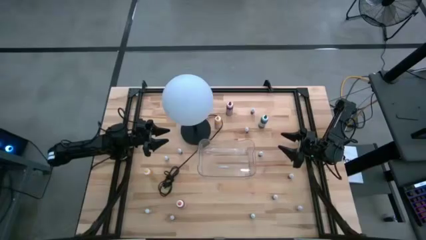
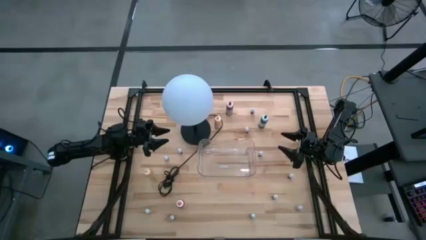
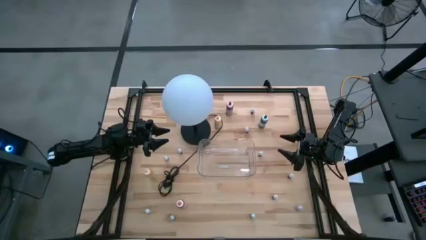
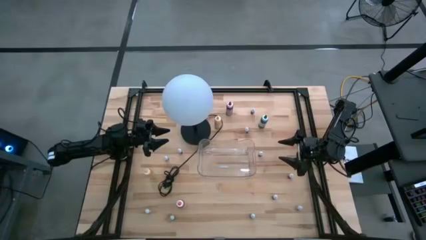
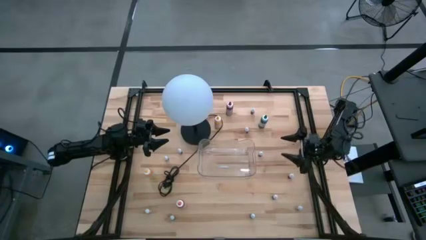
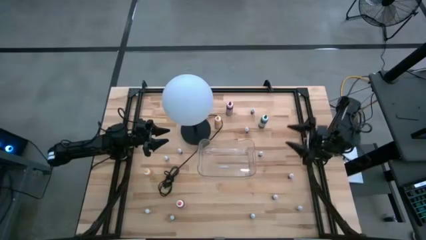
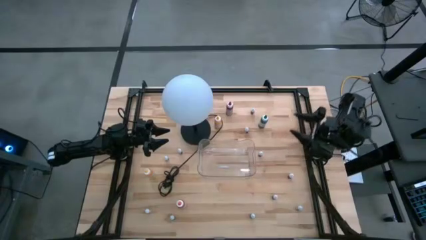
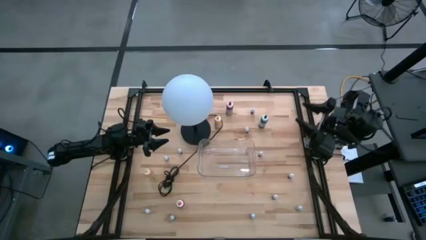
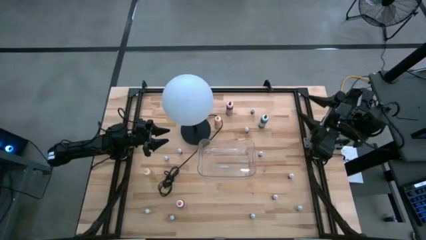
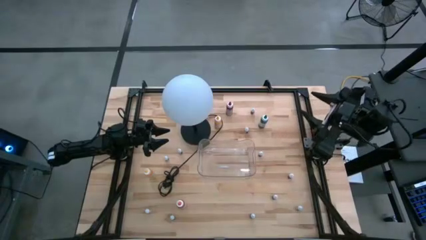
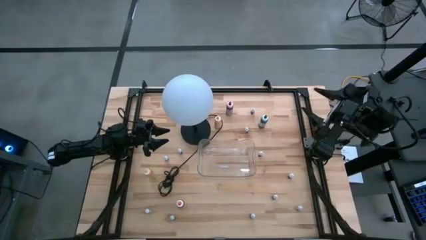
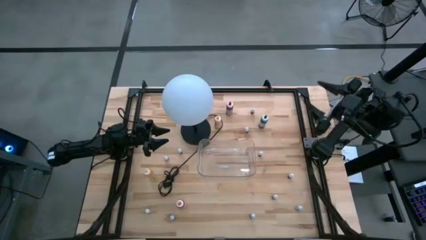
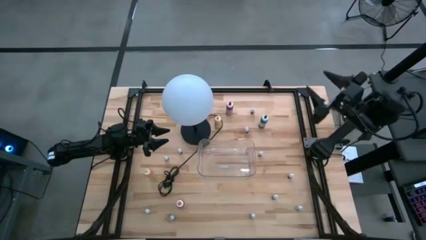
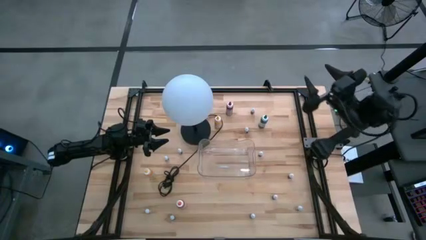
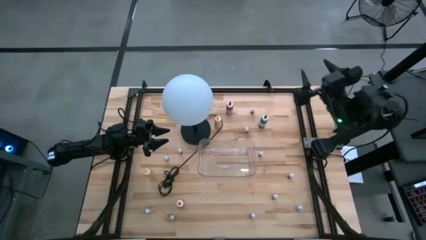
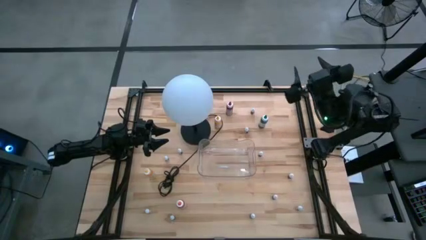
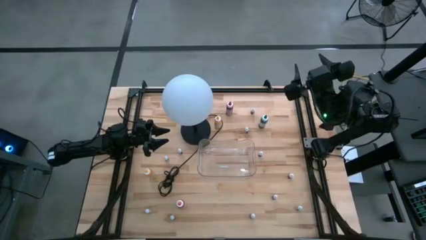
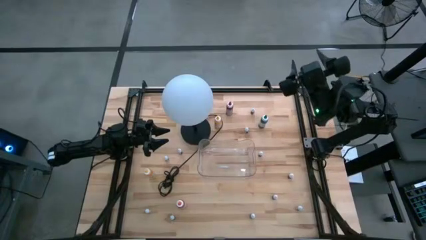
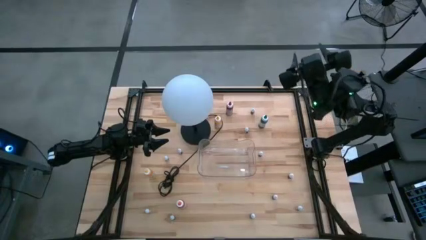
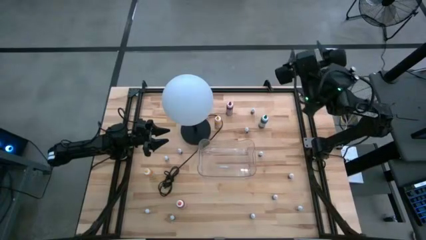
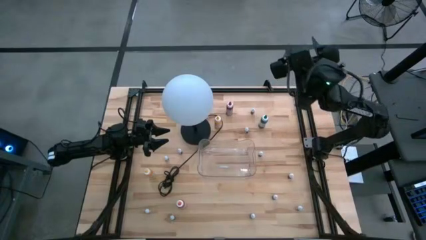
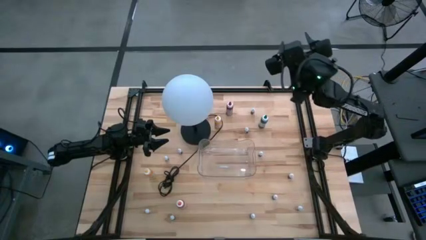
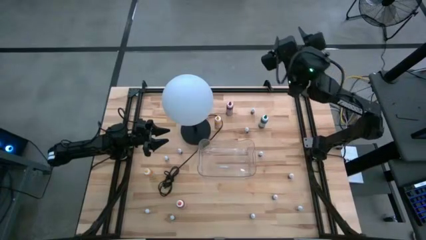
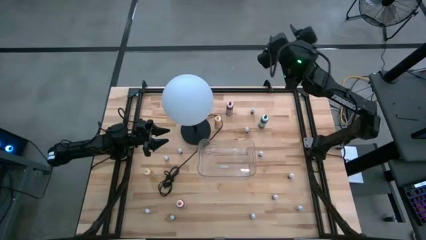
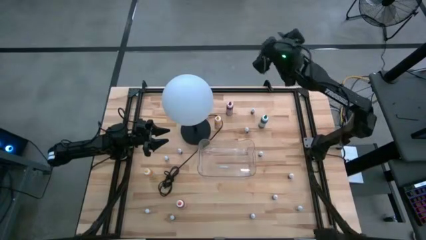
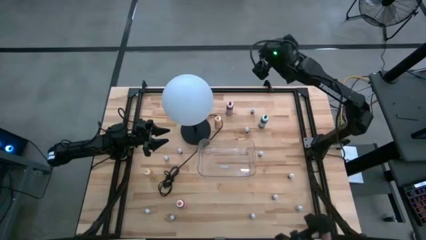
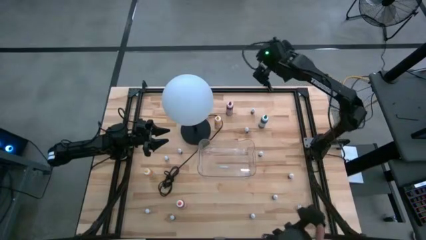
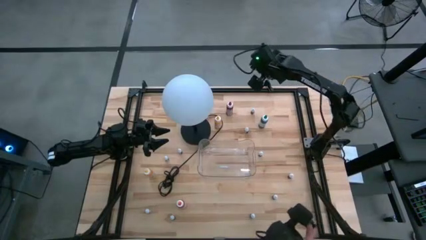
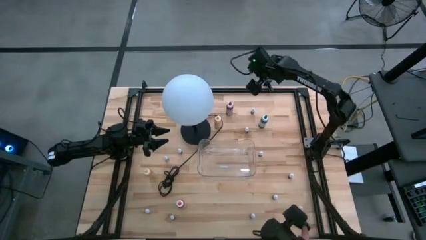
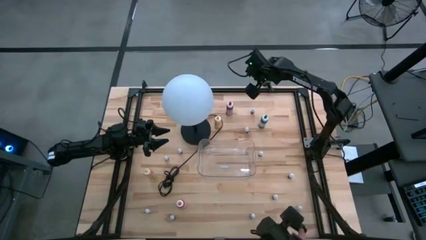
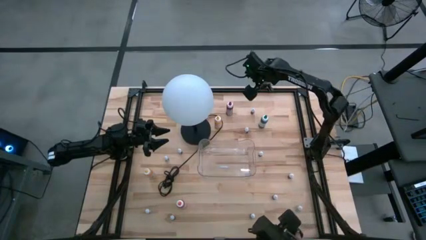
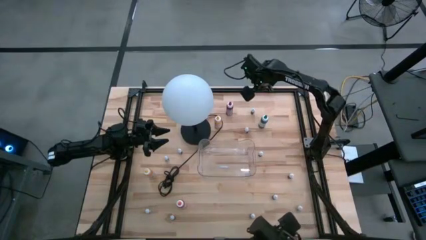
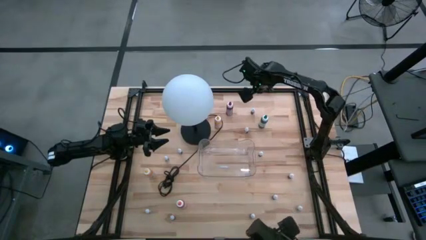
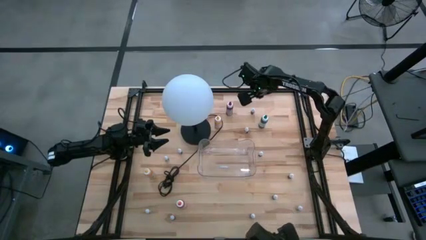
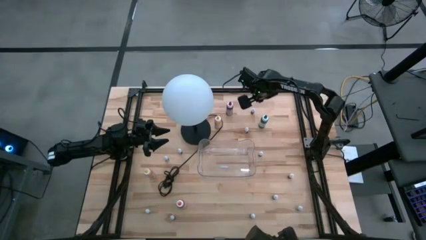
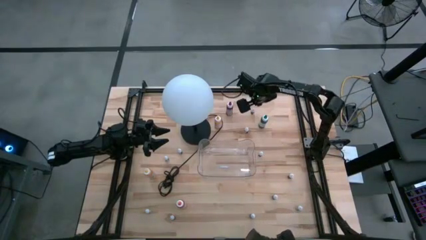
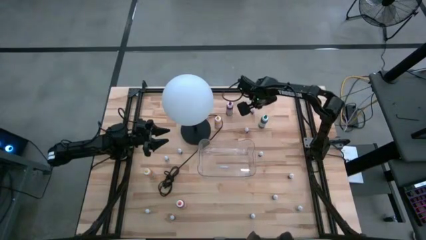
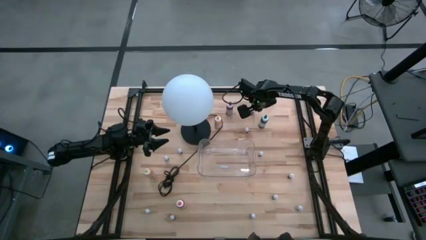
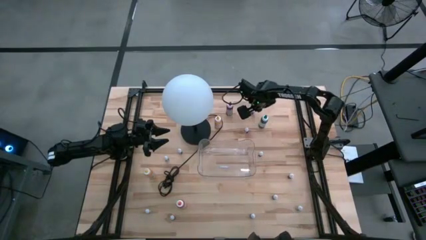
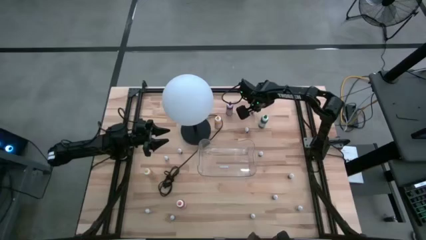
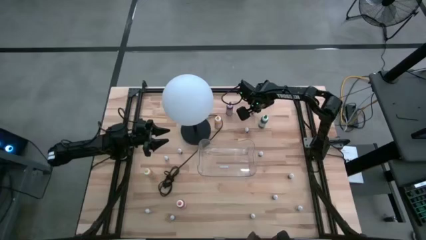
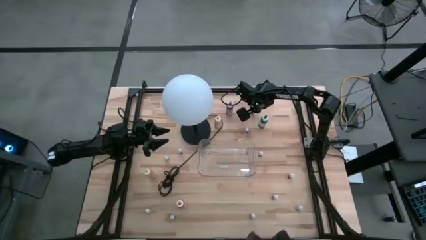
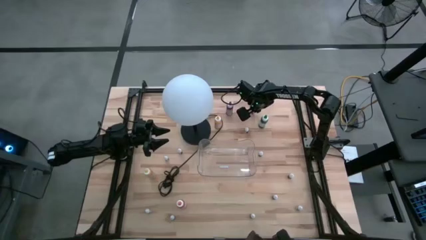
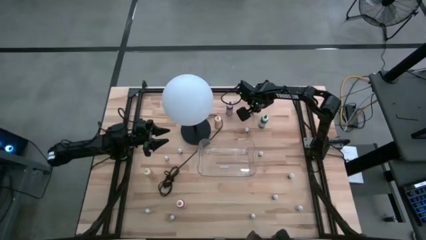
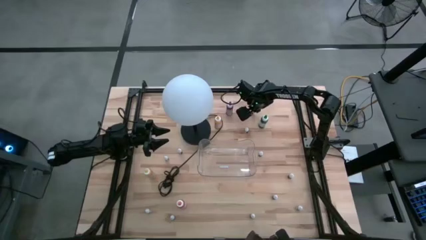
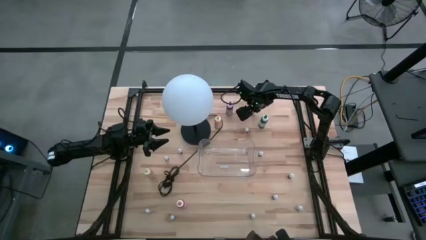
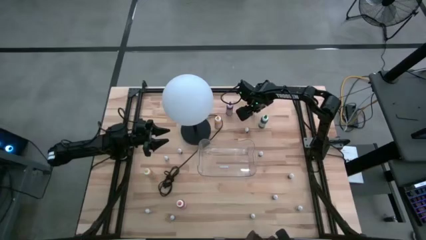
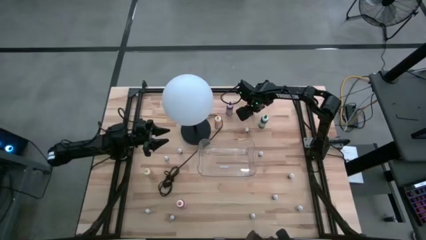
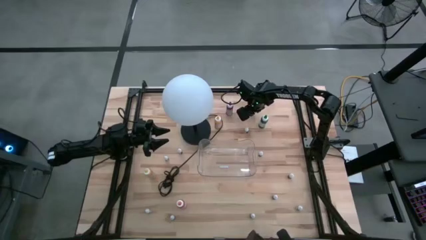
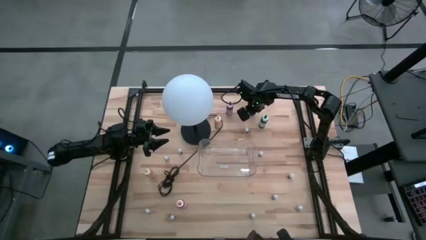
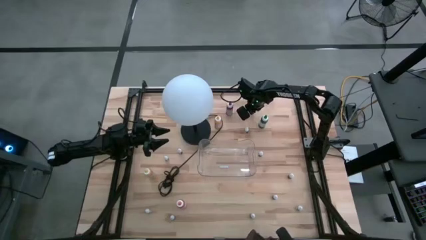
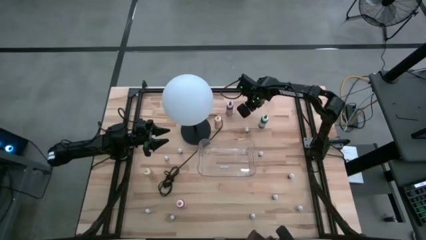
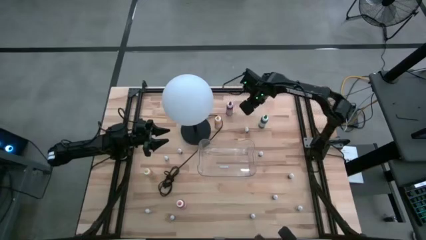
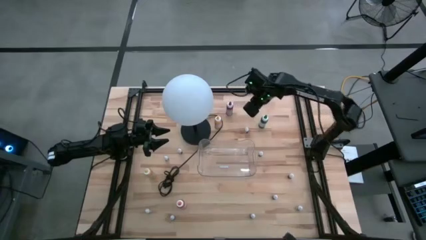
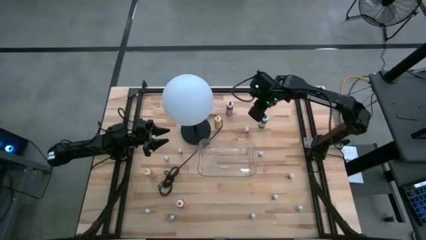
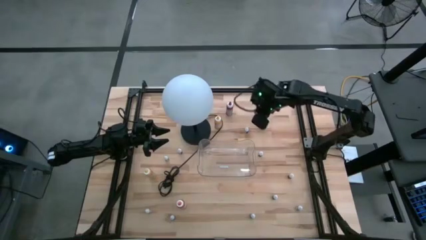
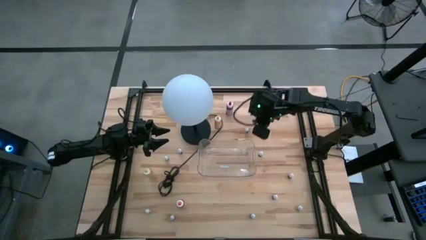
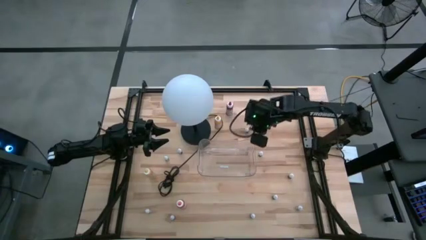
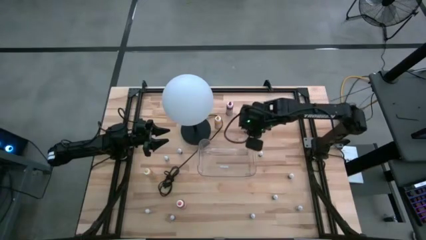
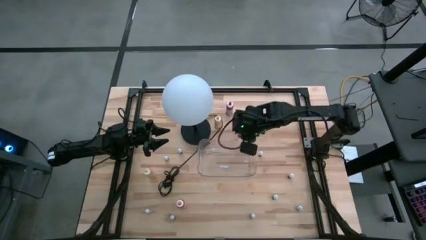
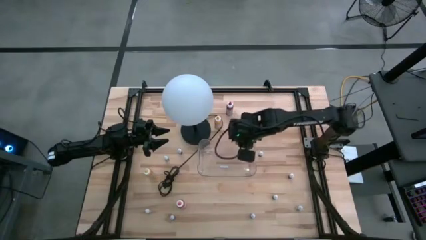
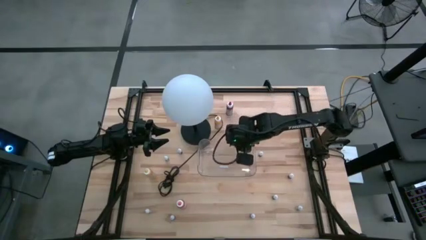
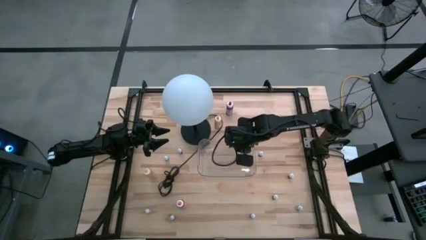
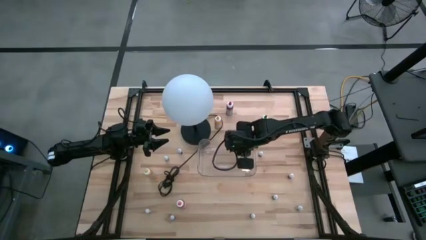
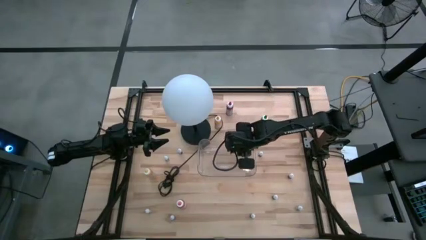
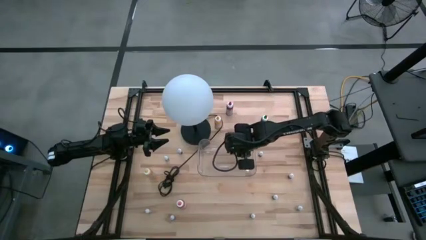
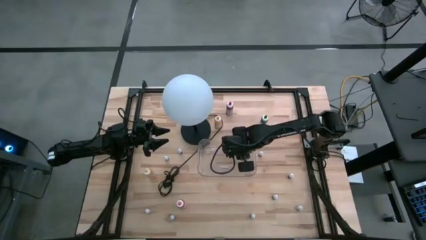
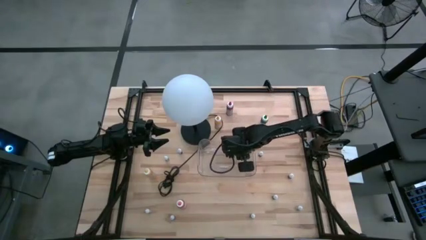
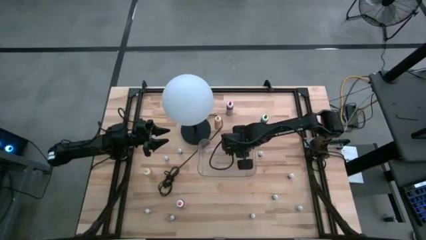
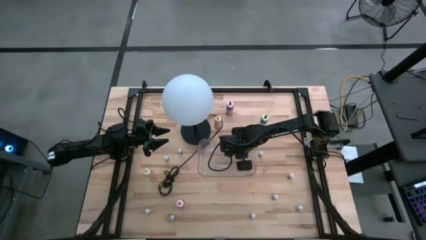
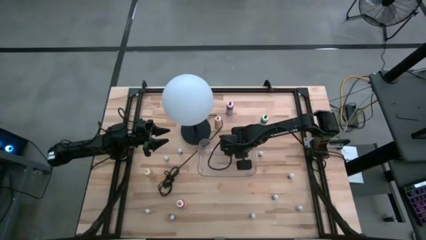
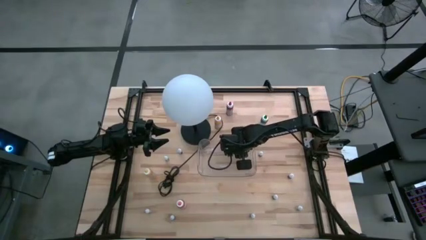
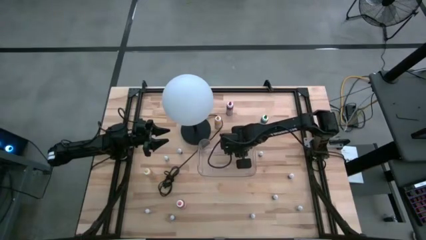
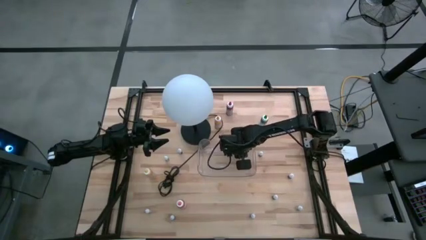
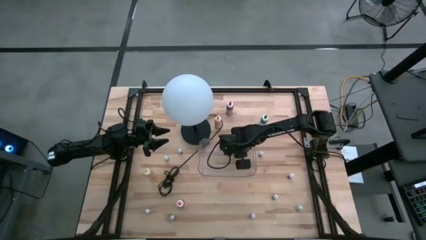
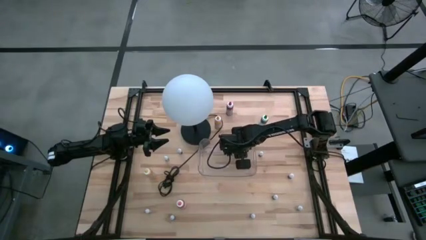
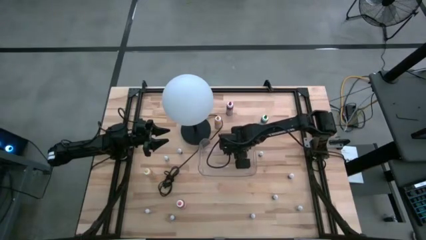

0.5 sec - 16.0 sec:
Task: Pick & Place food coloring
Put the small red food coloring bottle into the transparent bin
